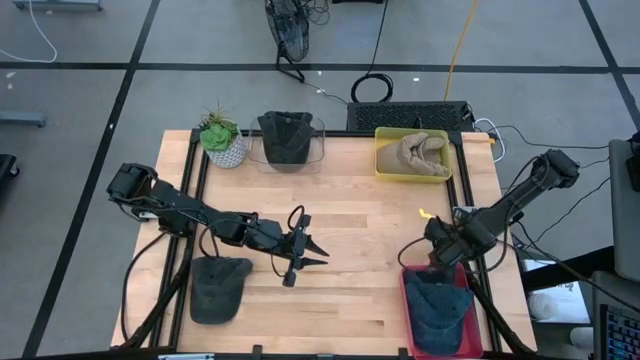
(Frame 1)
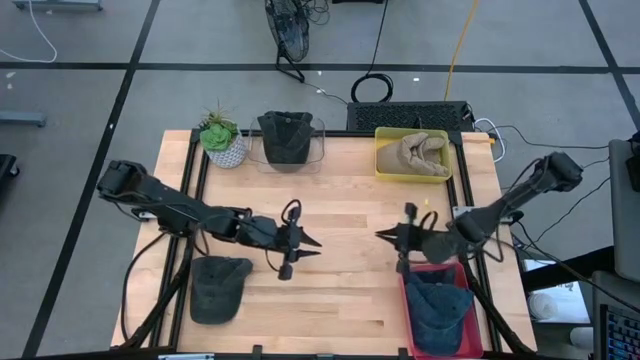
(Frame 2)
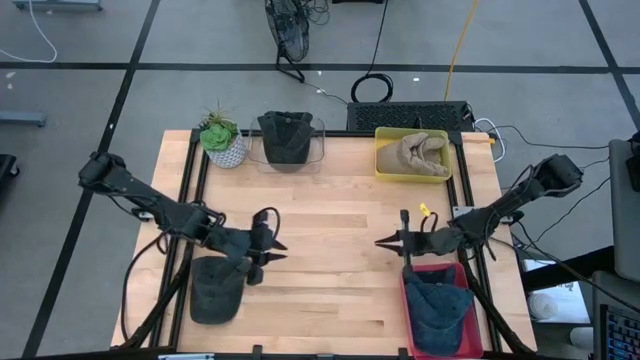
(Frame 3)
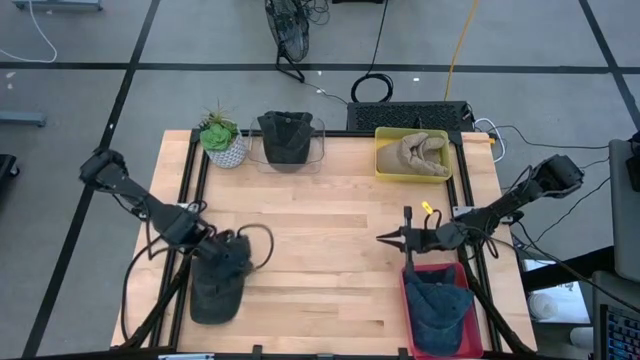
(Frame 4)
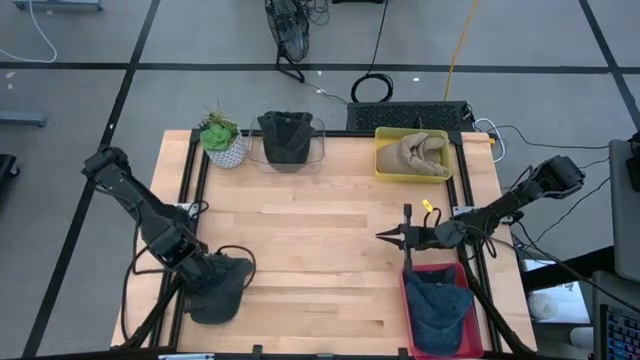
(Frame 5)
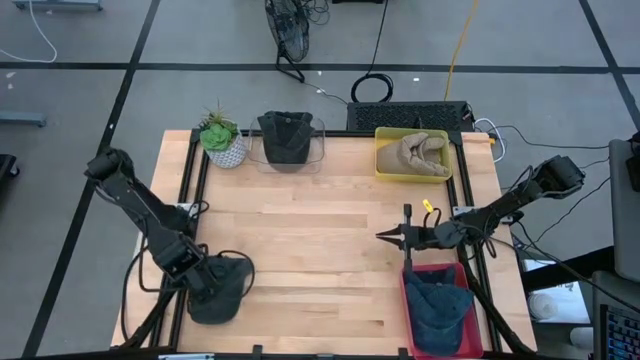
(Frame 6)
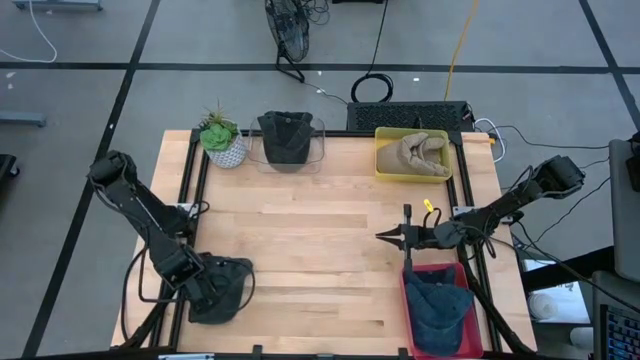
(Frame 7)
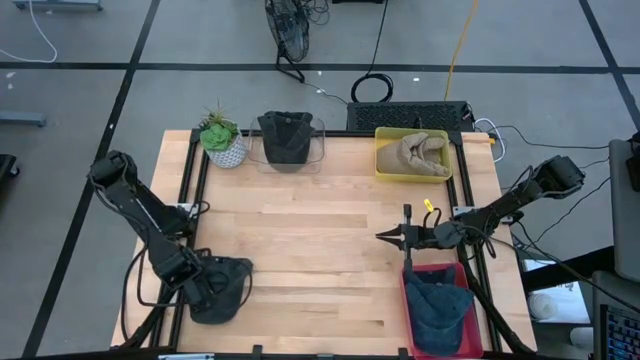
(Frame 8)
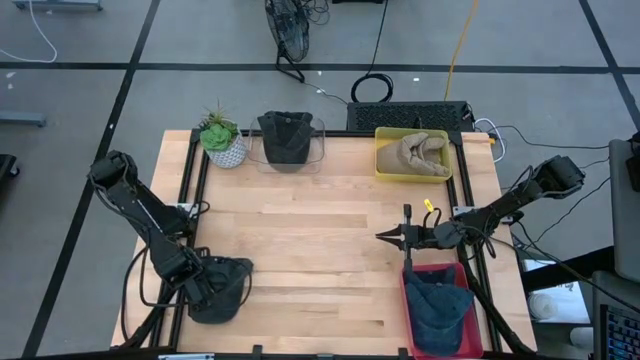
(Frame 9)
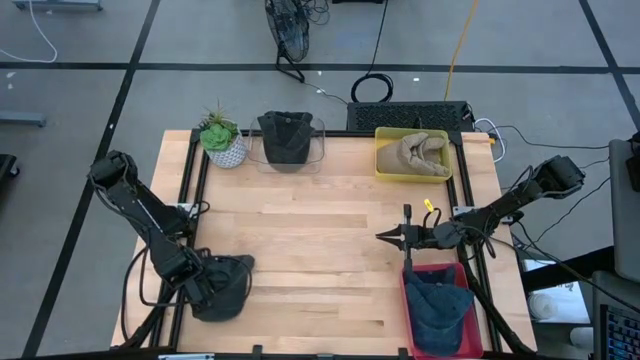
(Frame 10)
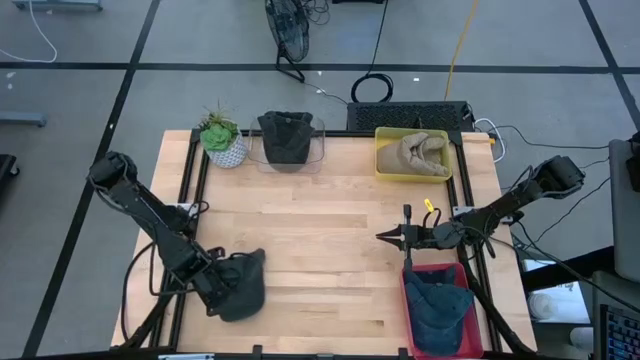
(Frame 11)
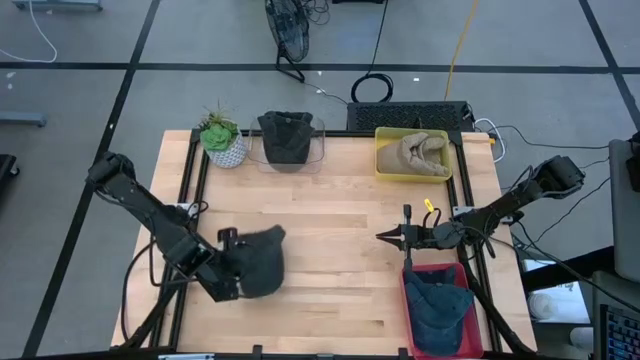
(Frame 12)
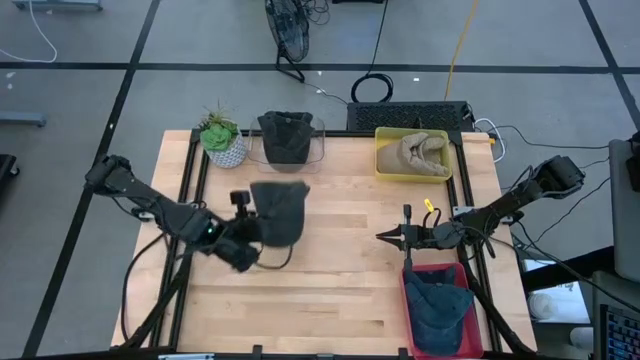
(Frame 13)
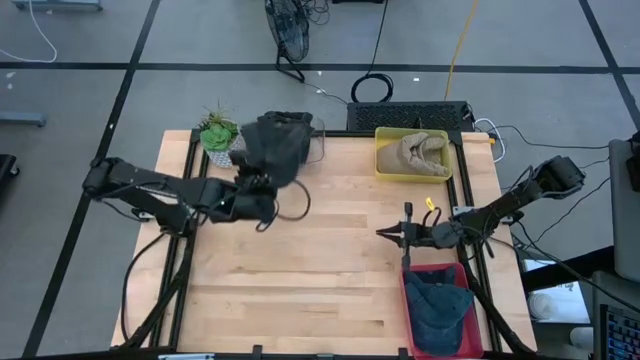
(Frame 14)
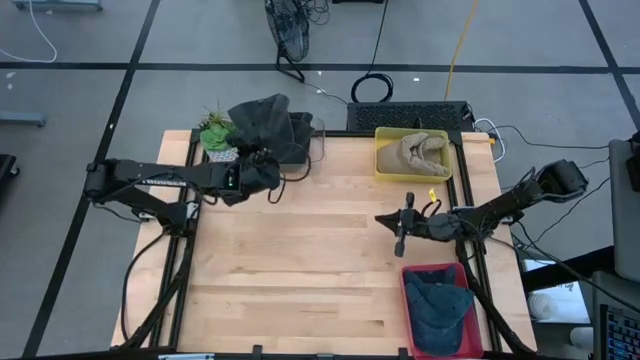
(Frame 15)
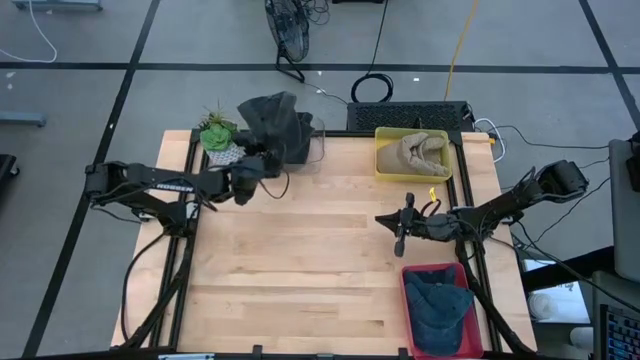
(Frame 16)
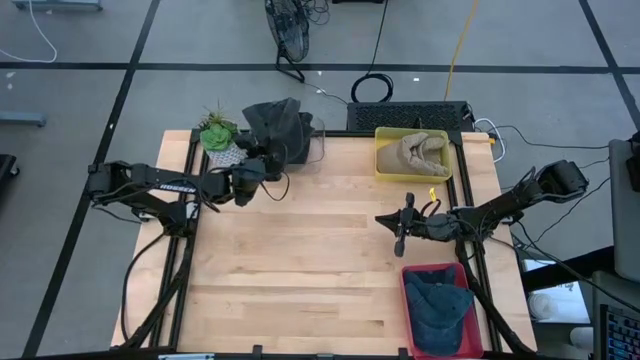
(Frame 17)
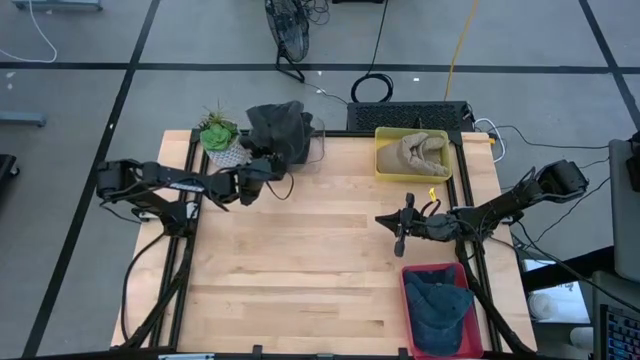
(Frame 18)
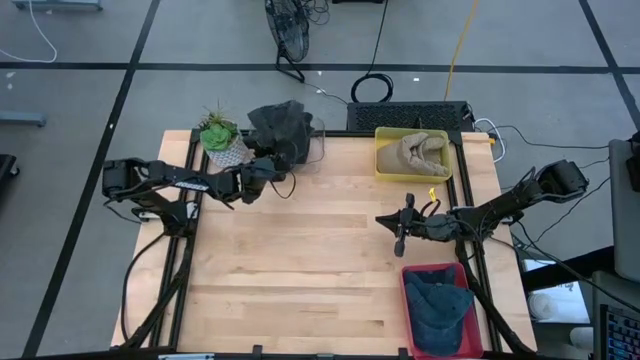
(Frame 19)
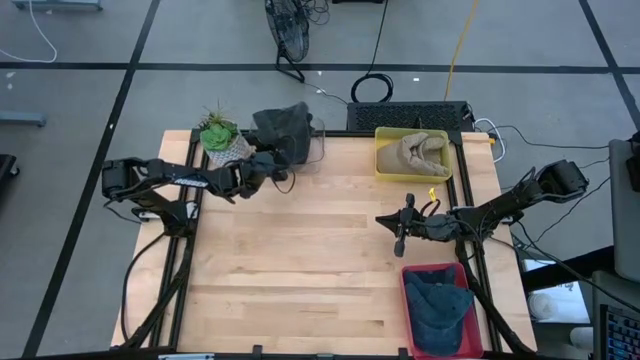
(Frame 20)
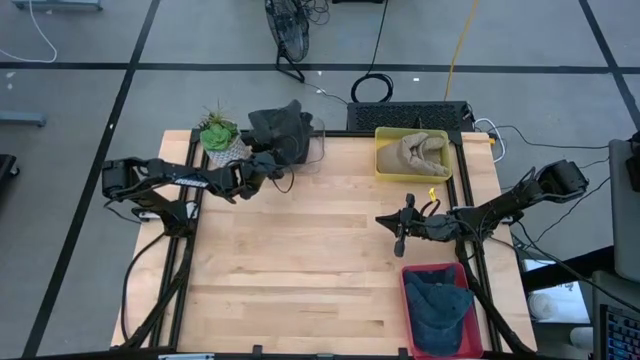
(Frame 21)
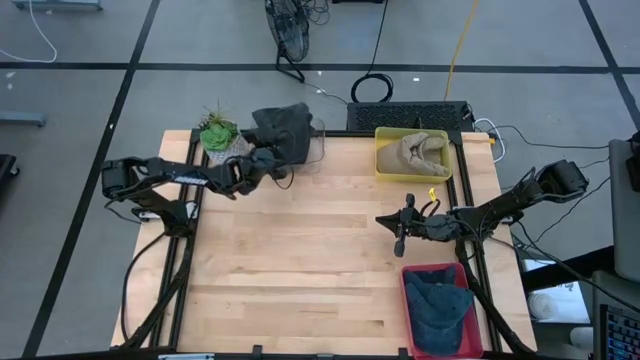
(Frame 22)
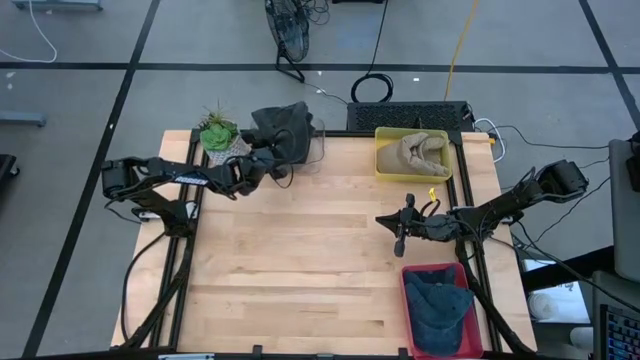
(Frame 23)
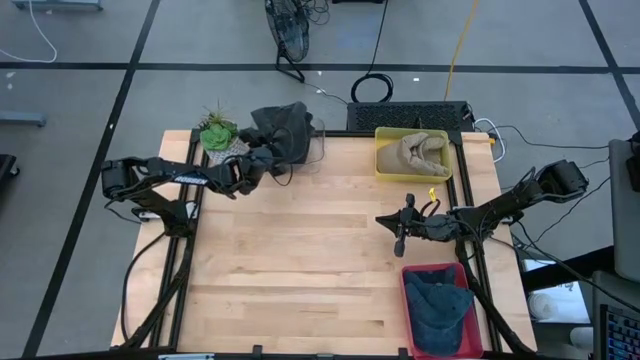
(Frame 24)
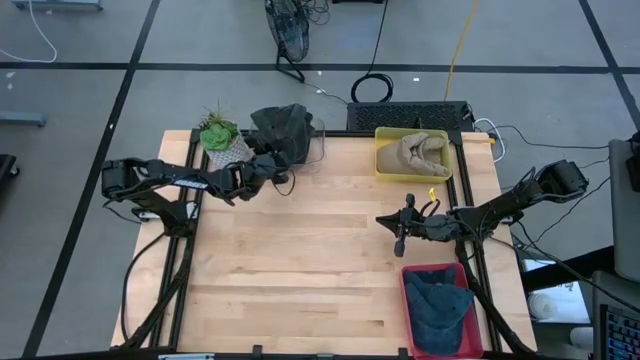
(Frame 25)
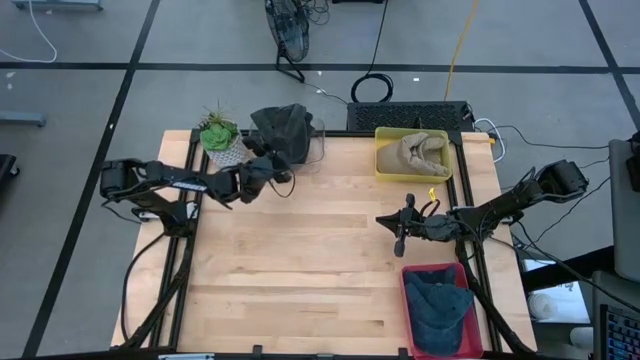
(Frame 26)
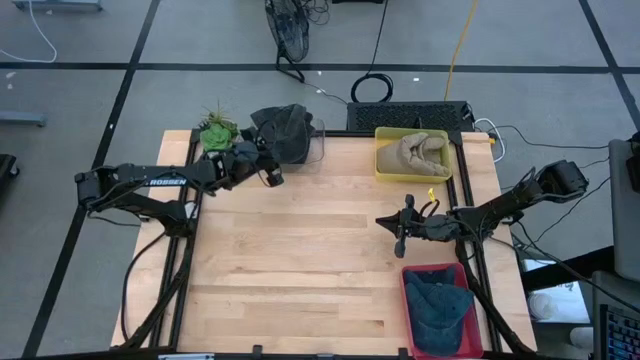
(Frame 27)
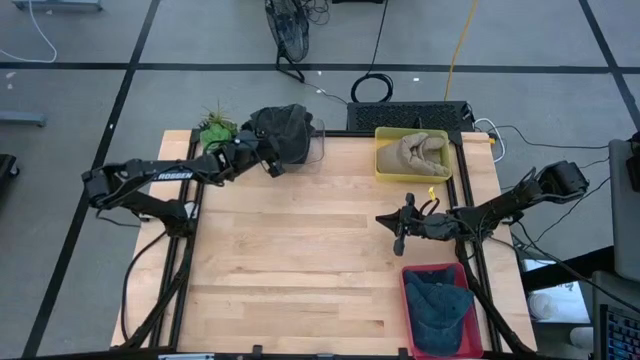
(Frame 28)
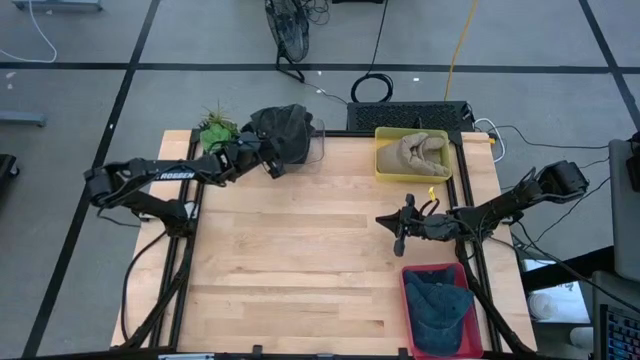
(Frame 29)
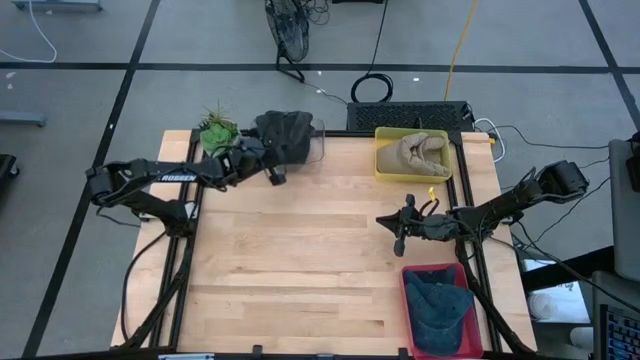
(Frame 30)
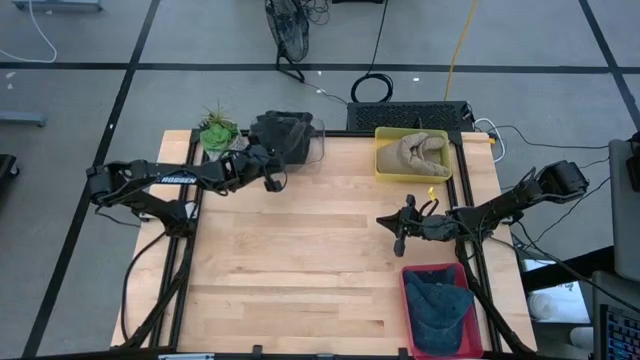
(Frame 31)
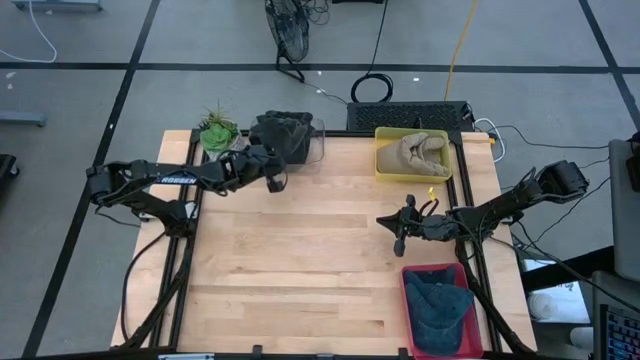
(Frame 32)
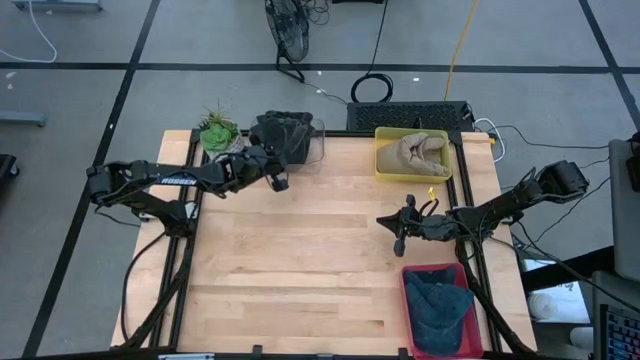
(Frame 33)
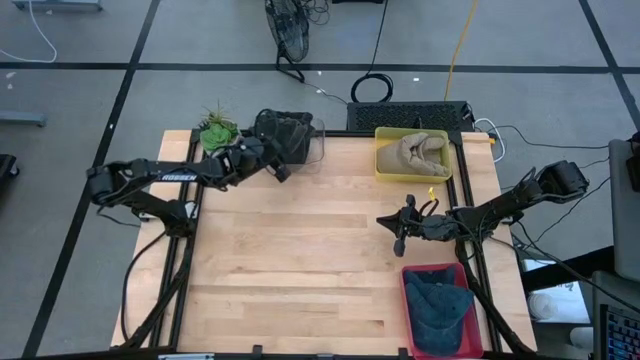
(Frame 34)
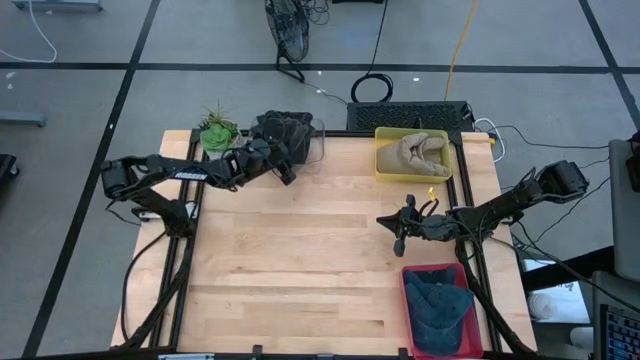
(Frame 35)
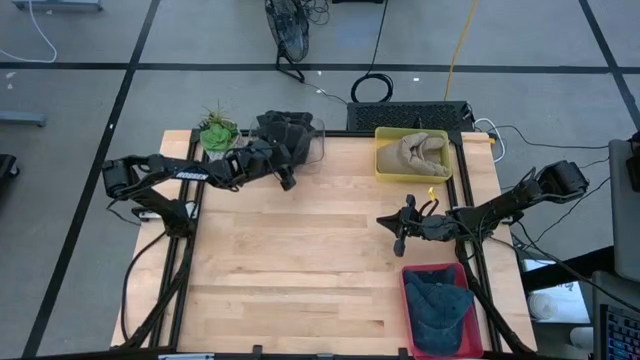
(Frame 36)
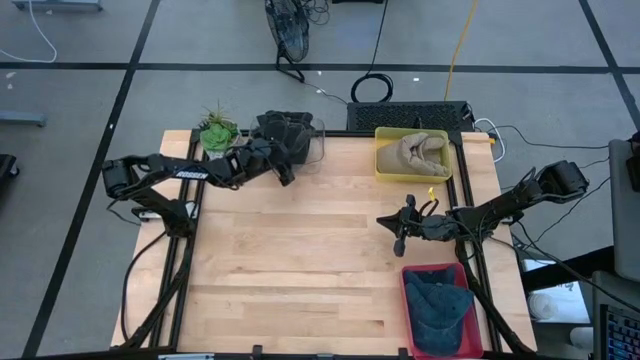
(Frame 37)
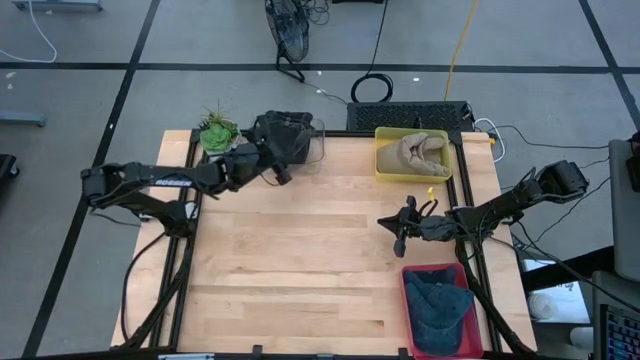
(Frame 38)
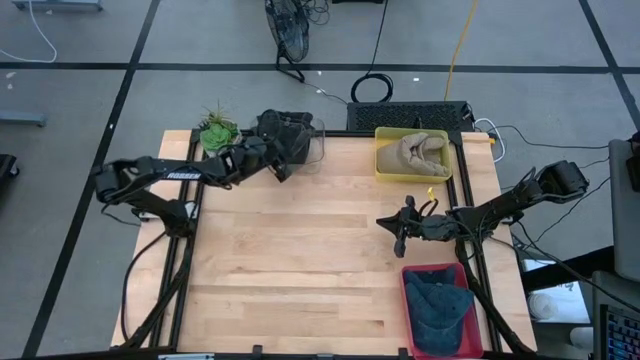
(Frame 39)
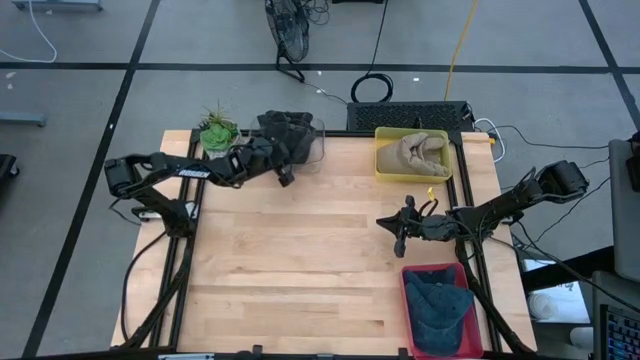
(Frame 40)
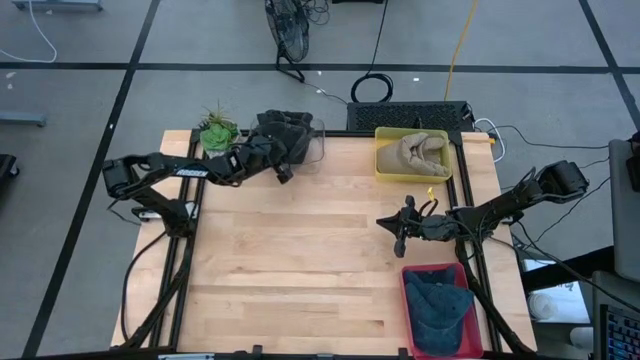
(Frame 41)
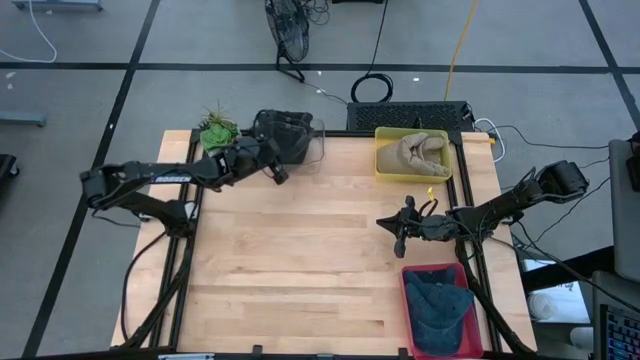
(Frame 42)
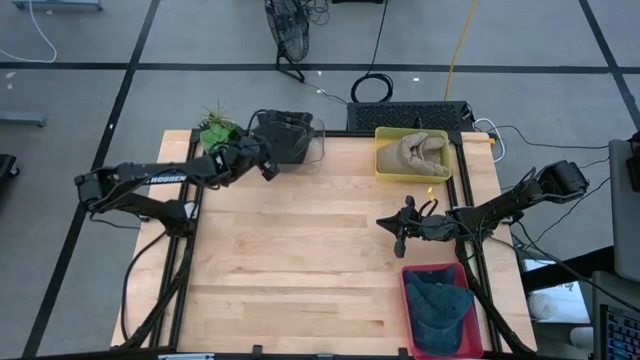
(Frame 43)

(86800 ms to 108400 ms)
Task: Pick & Place hat
Put the black cap into the transparent bin

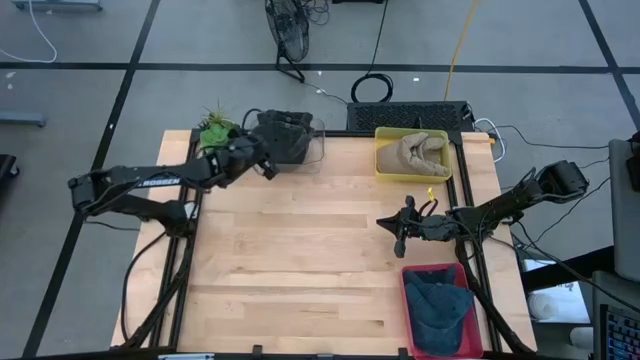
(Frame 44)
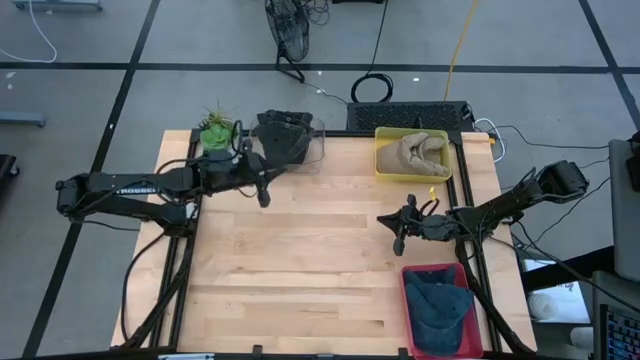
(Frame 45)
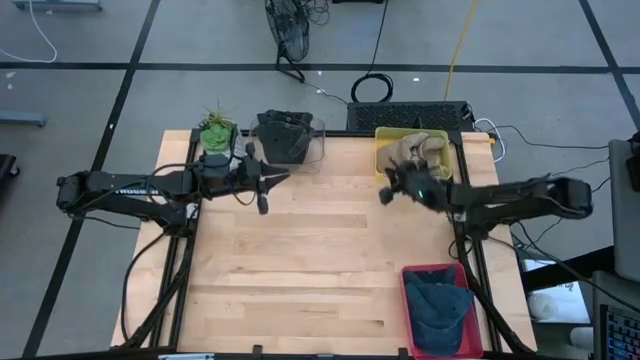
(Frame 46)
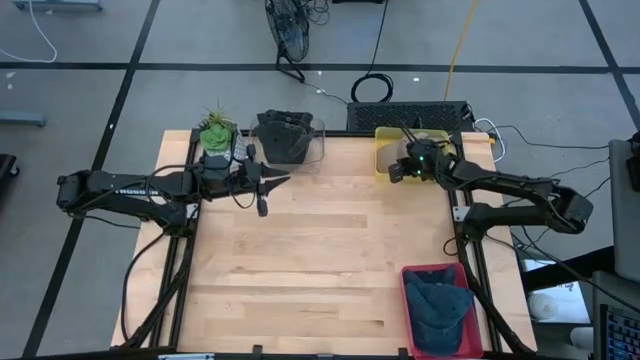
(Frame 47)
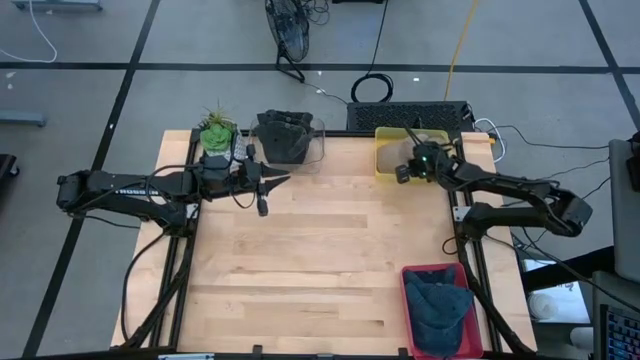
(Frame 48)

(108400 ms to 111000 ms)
Adjust the brown cap in the yellow bin
